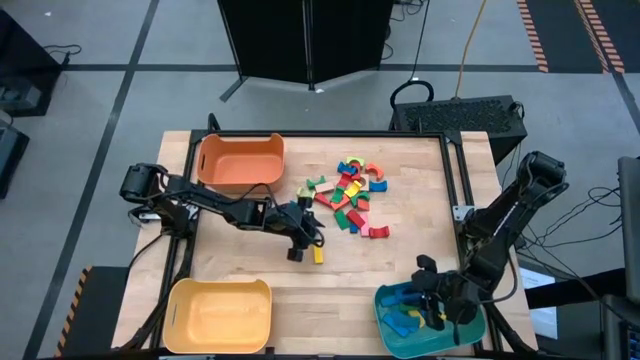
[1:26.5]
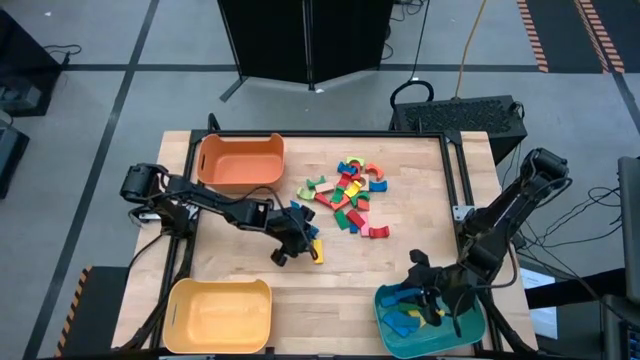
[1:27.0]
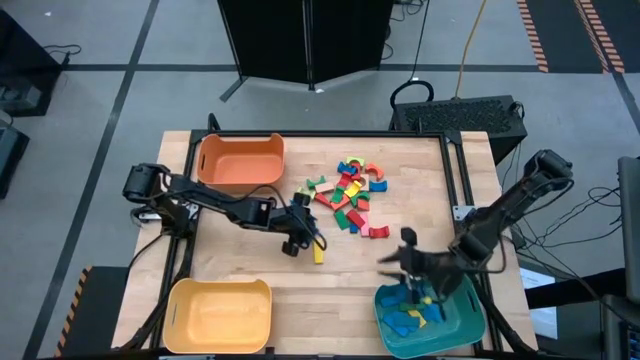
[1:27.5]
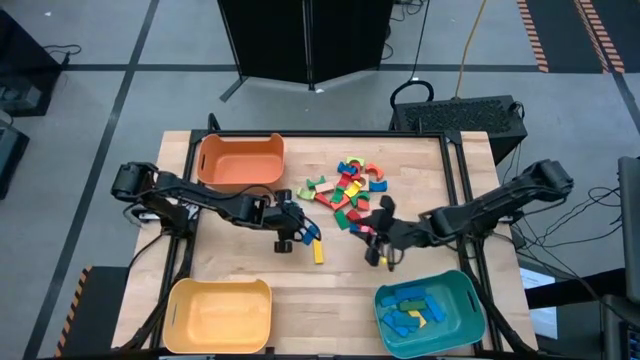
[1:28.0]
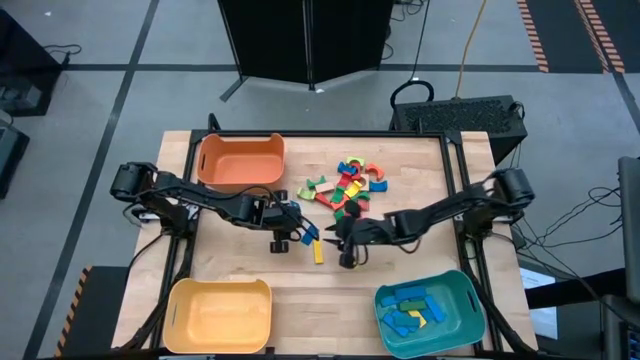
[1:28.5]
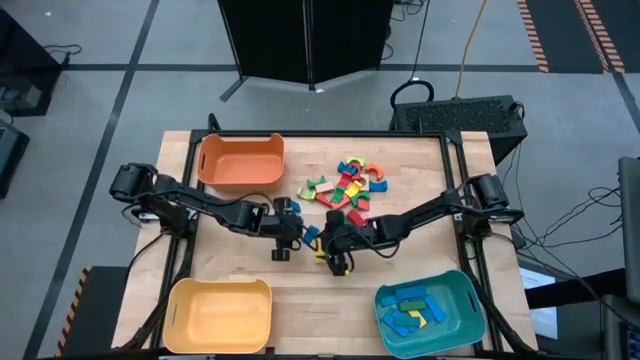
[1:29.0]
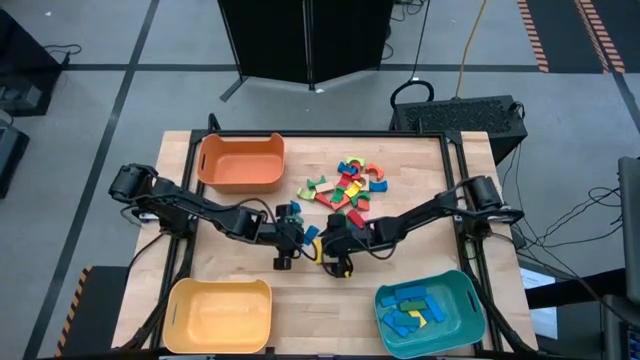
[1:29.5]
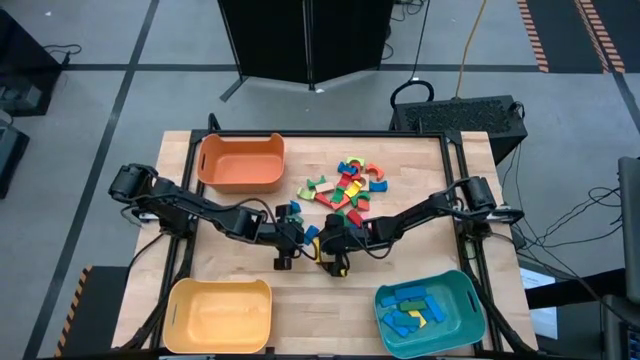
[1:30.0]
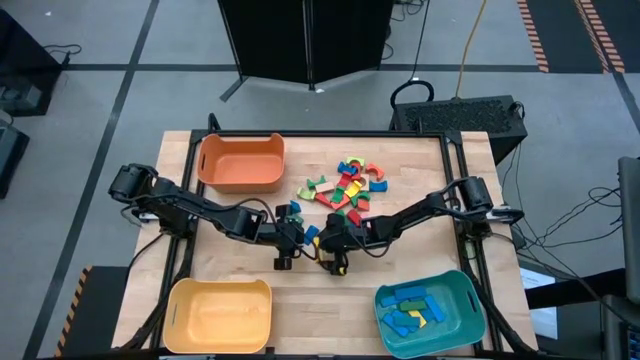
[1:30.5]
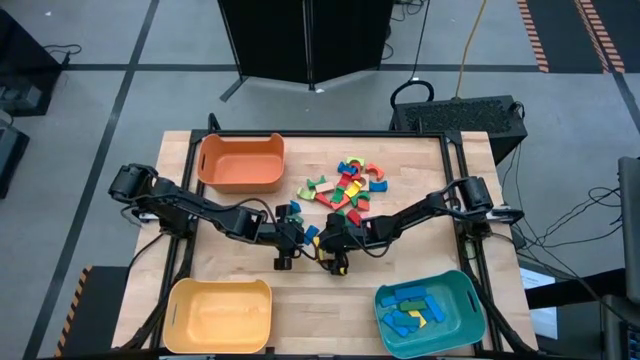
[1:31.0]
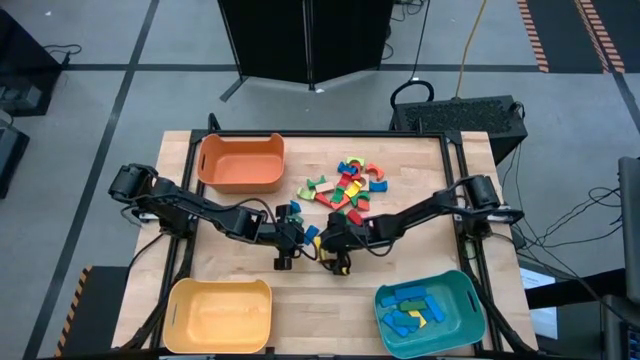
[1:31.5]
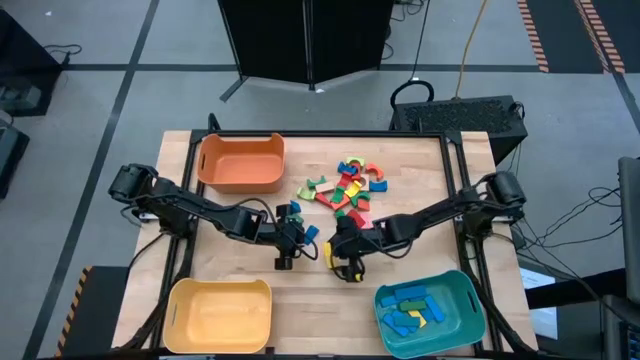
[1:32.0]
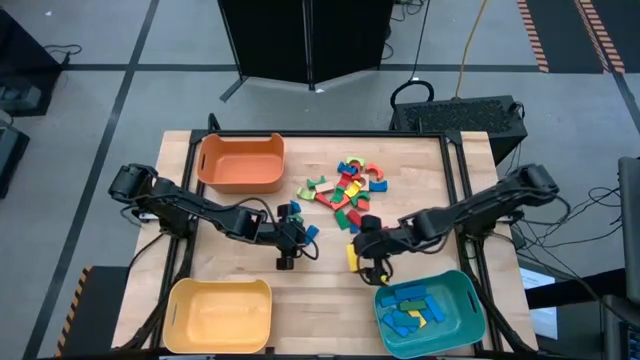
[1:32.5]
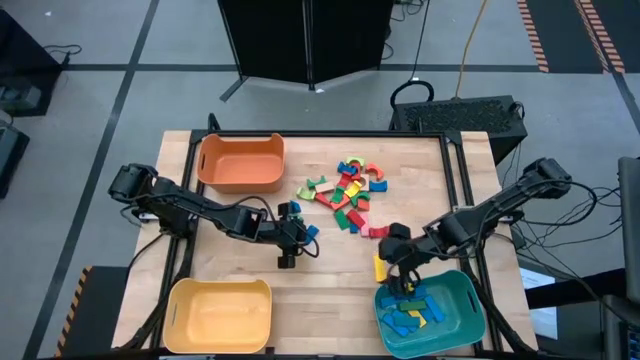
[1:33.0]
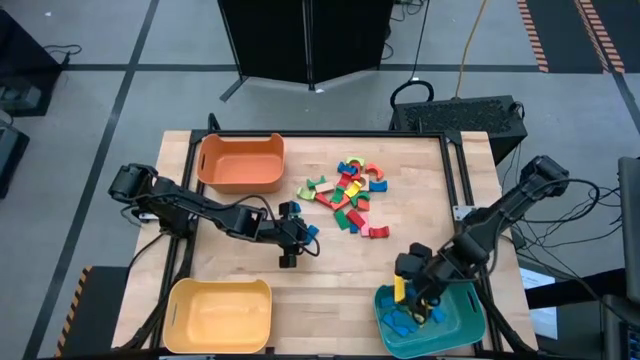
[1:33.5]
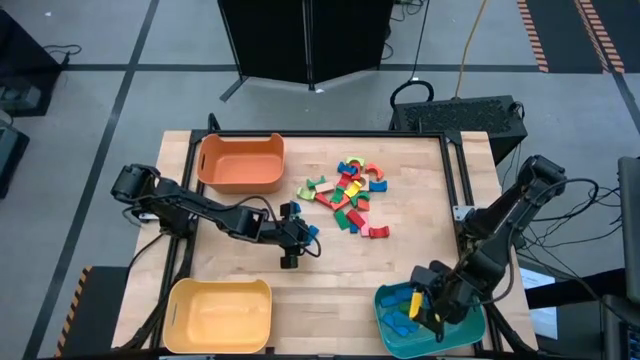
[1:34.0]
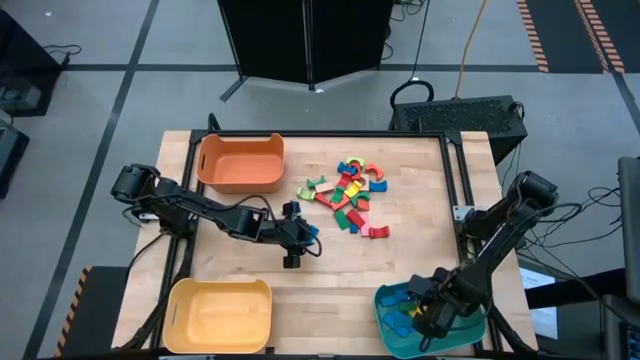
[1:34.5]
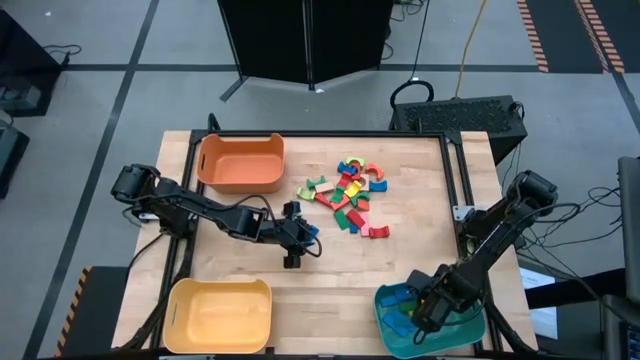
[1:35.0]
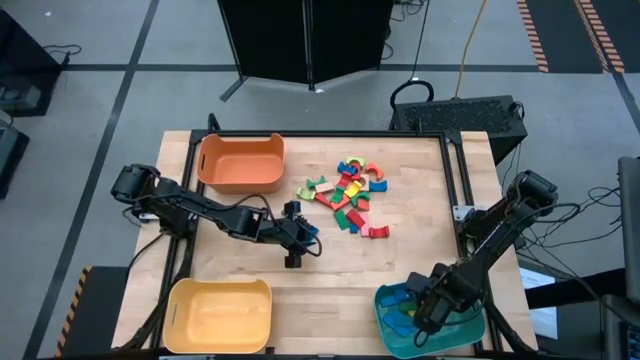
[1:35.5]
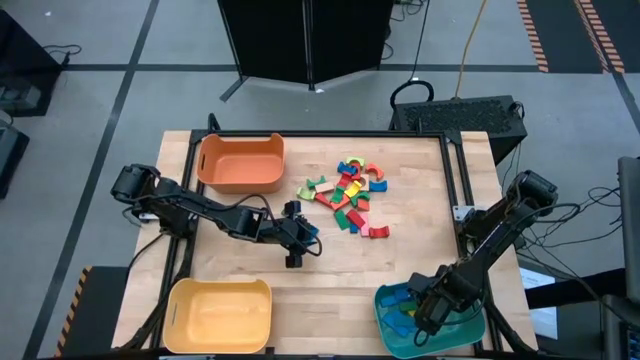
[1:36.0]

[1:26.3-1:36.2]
Task: Sort blocks by size
Put the yellow rectangular block into the blue bin

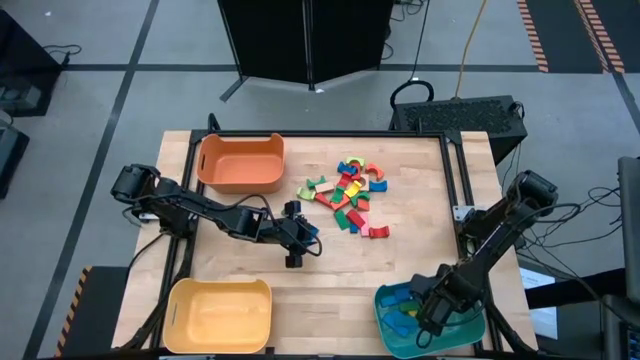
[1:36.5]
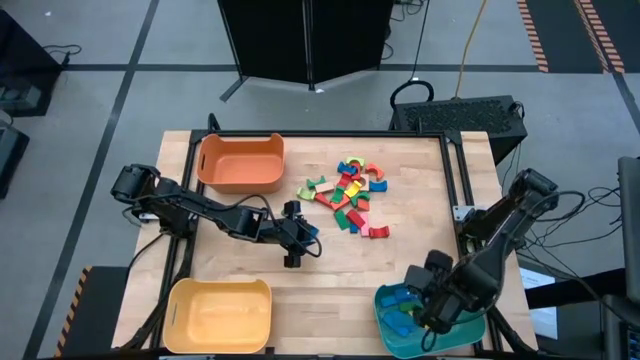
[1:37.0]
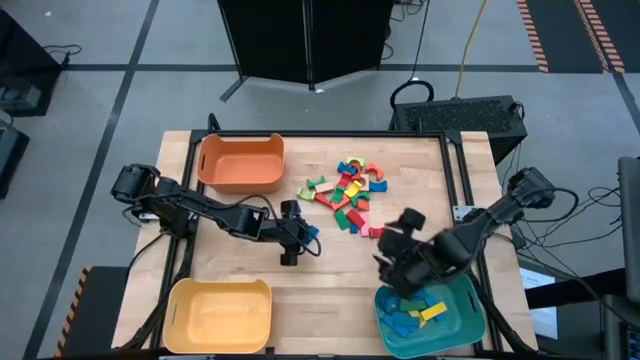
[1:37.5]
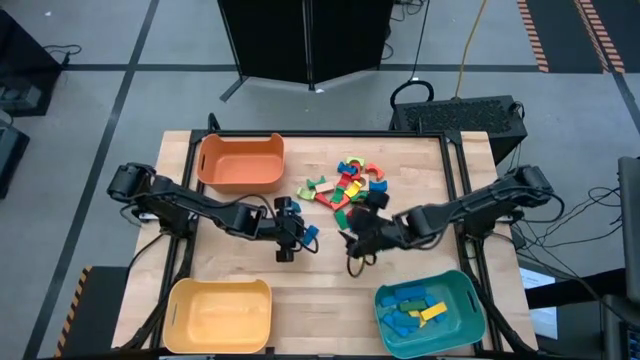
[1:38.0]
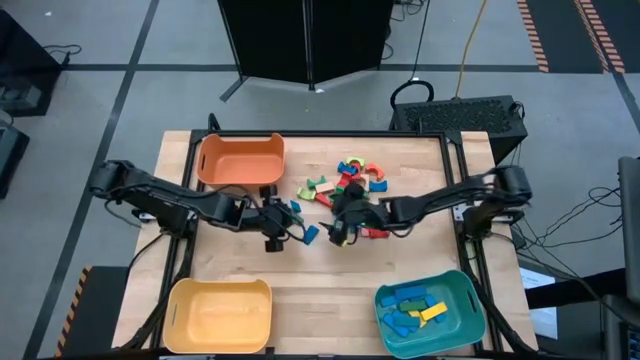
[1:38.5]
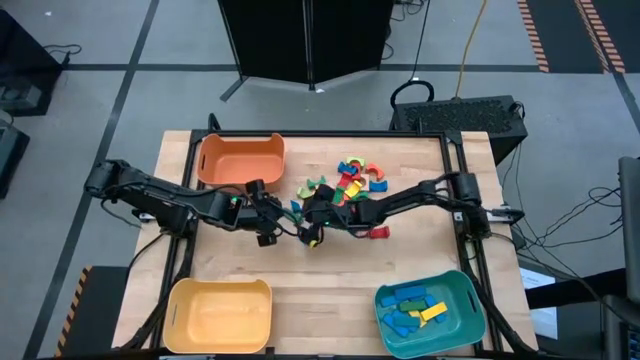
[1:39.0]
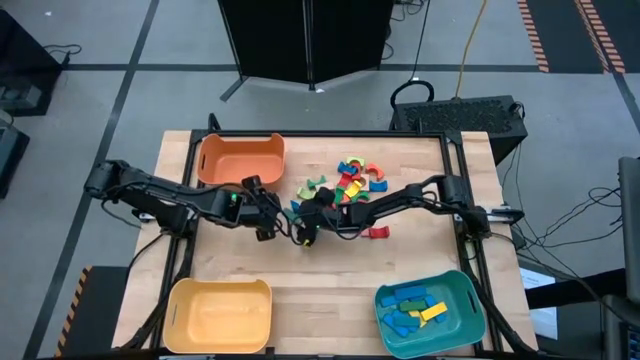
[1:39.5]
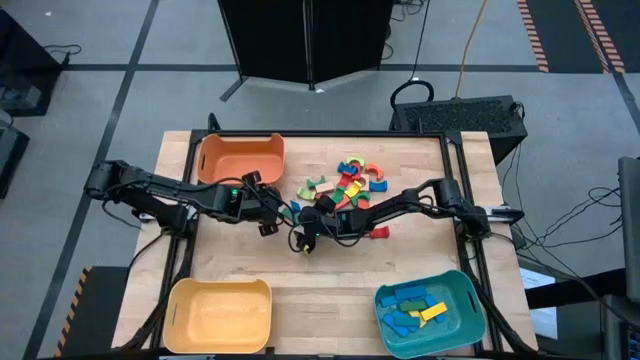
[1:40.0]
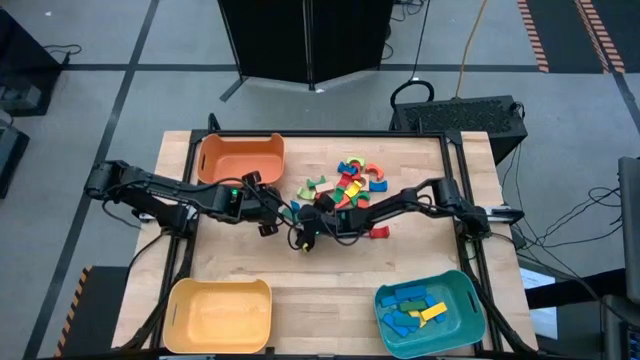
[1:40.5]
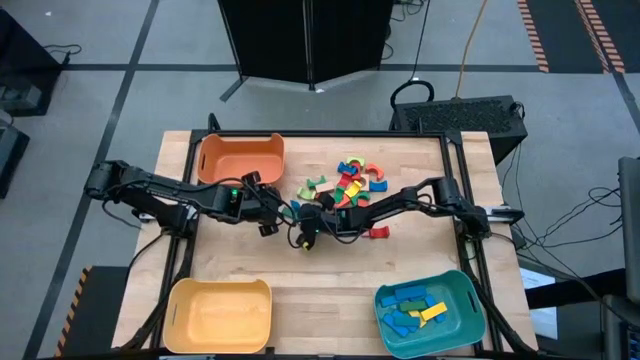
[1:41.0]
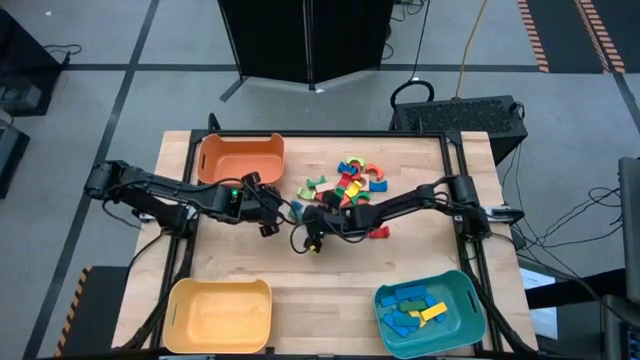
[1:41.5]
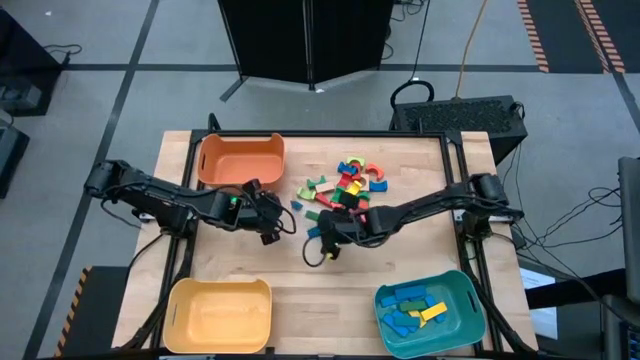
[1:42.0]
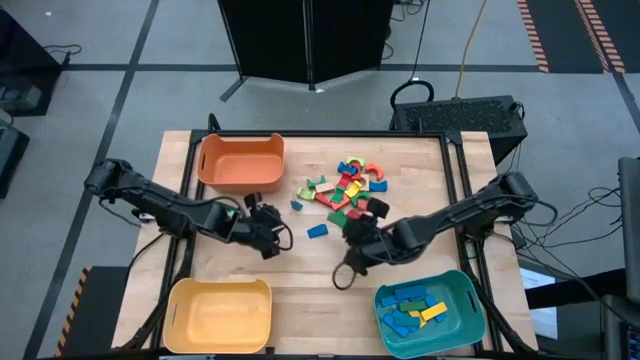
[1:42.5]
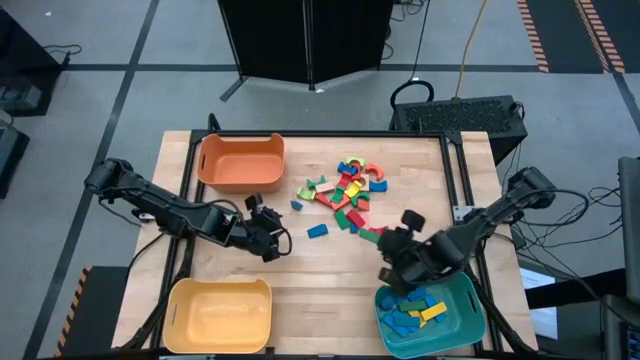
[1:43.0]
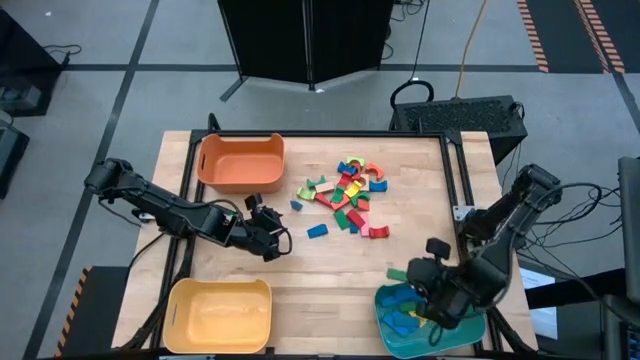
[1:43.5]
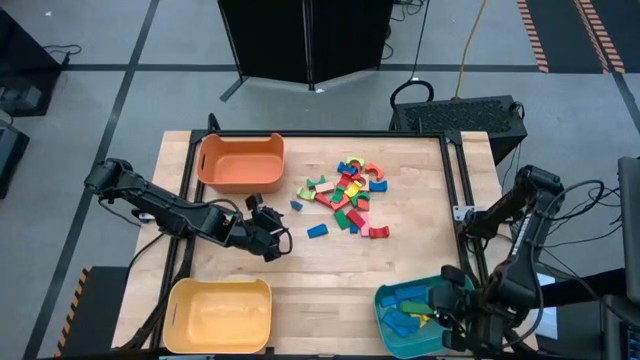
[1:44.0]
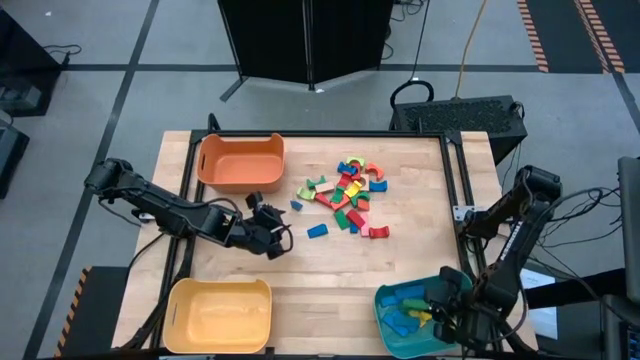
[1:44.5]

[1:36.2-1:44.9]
Put the green rectangular block into the blue bin

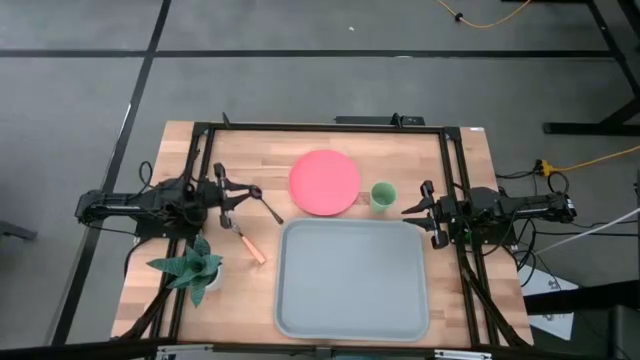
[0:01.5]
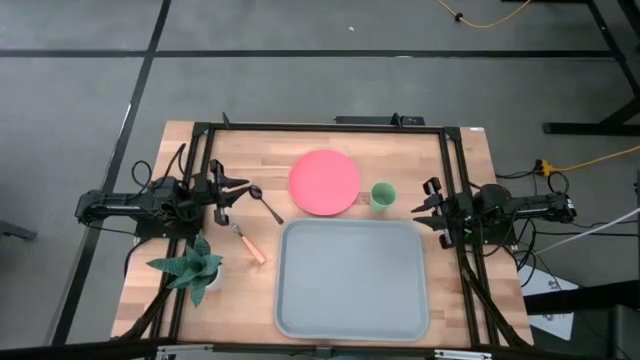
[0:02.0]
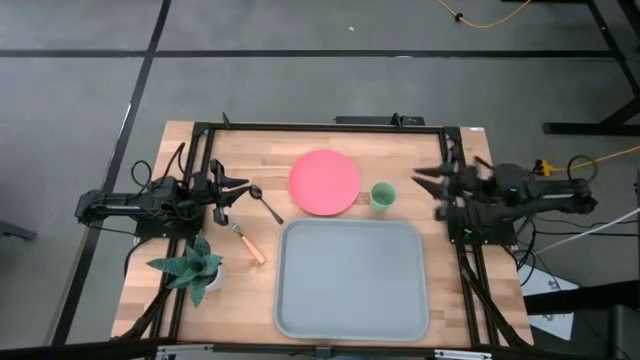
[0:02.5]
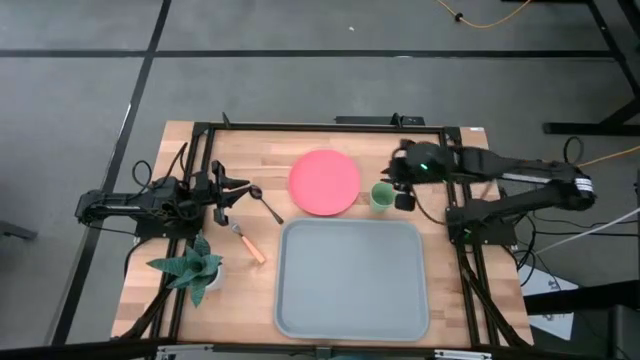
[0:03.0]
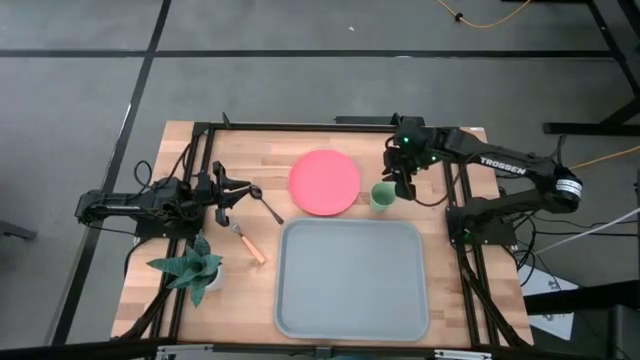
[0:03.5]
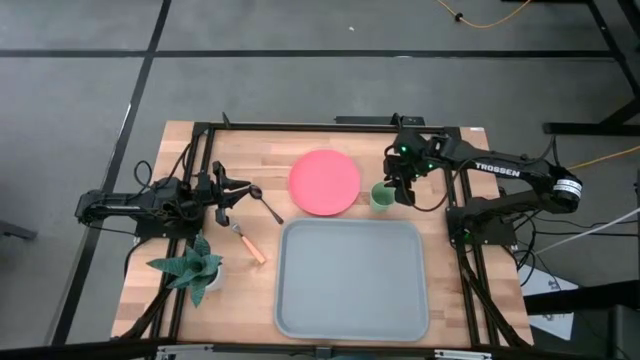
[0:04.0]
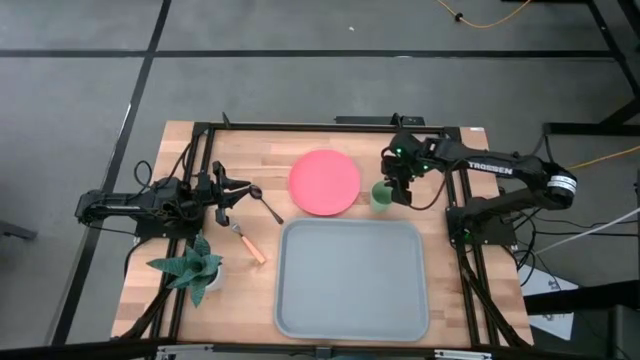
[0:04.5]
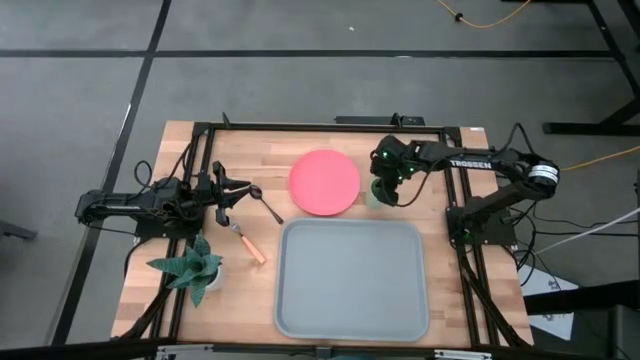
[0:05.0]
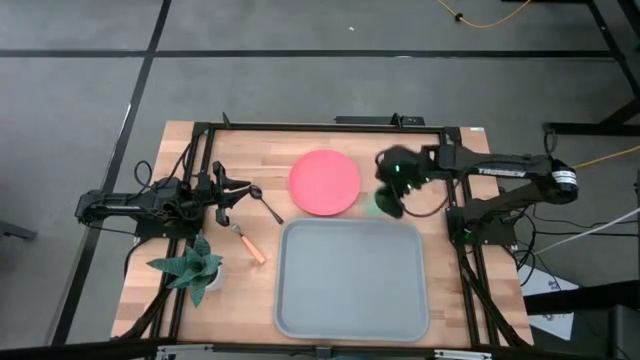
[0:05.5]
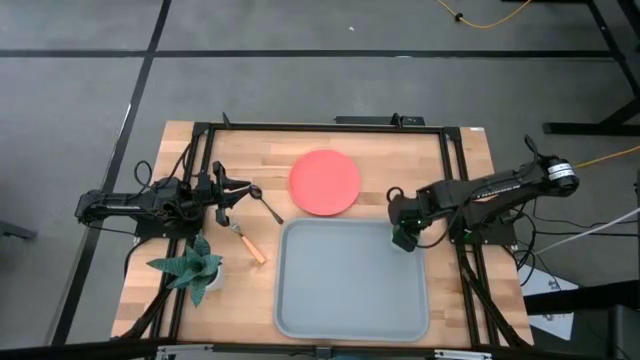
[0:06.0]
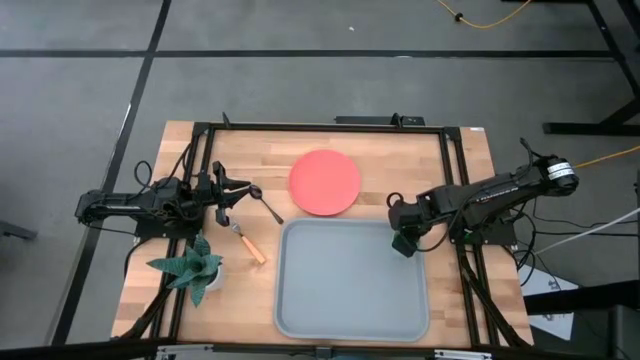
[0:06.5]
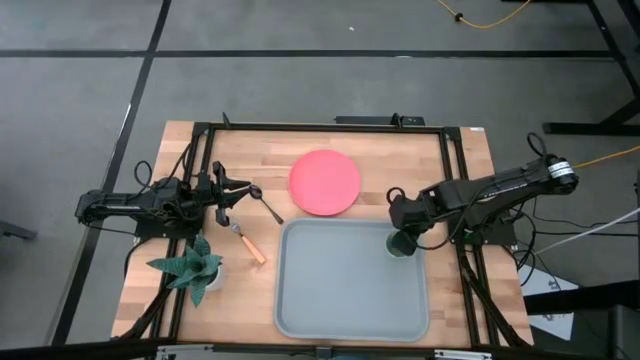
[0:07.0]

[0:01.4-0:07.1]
Task: Pick and place plate/cup/fork/spoon on tray
Put the green cup on the top right of the gray serving tray
